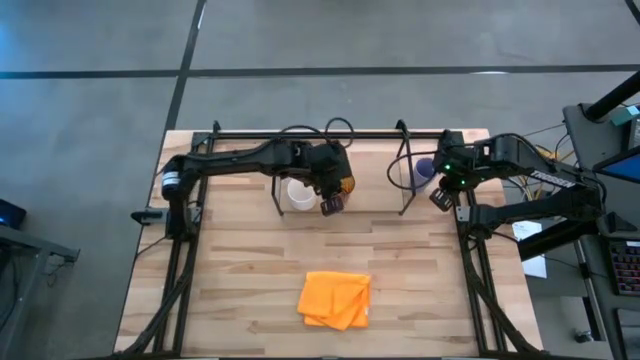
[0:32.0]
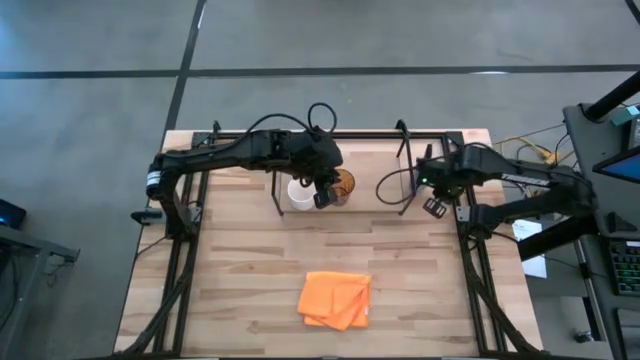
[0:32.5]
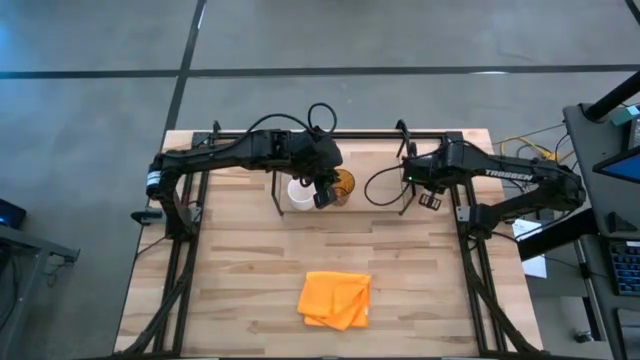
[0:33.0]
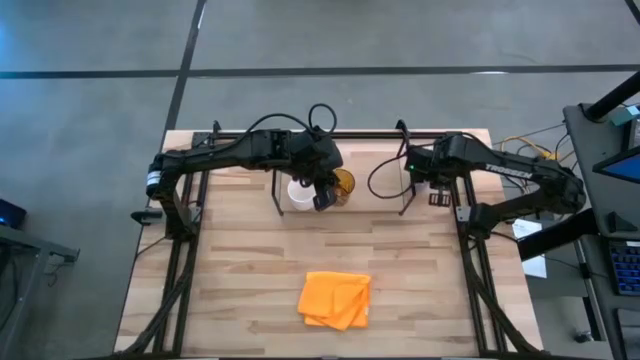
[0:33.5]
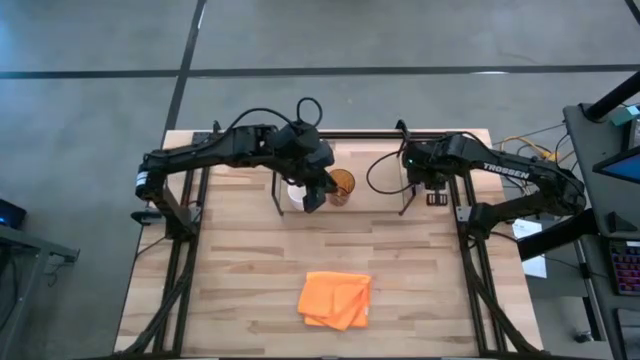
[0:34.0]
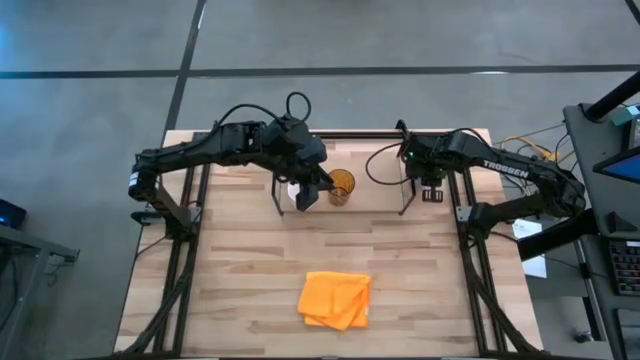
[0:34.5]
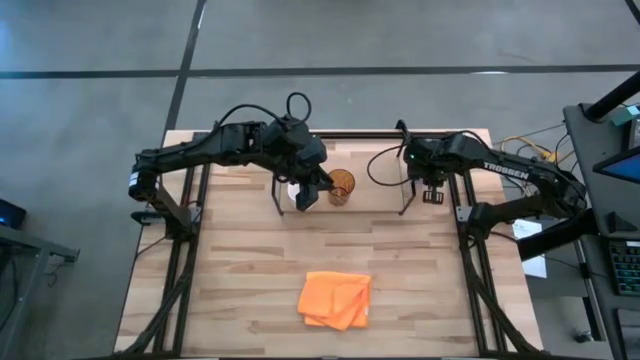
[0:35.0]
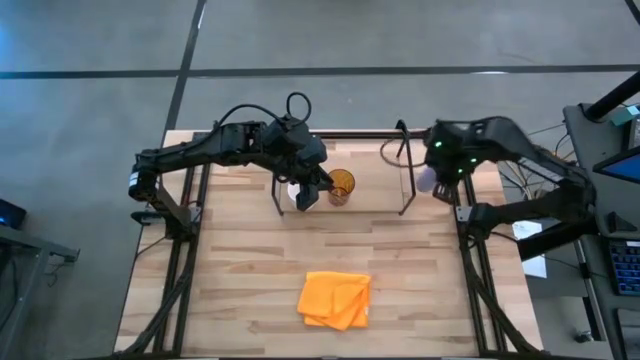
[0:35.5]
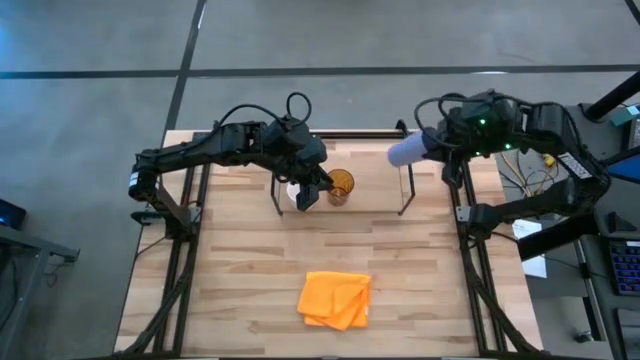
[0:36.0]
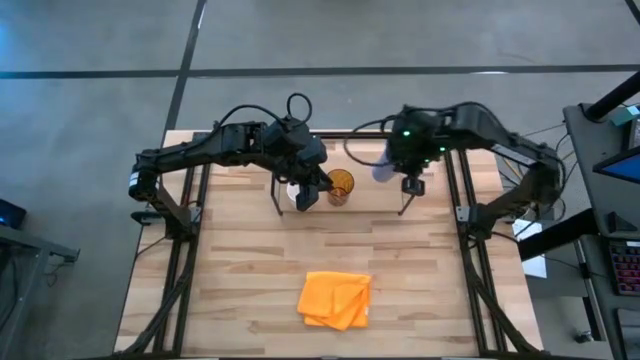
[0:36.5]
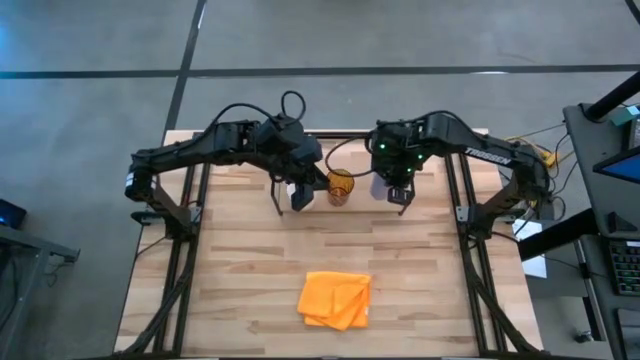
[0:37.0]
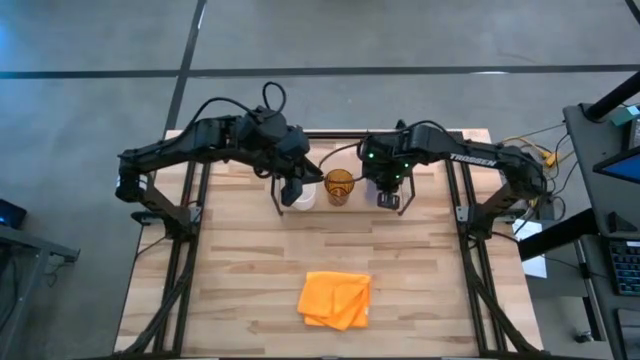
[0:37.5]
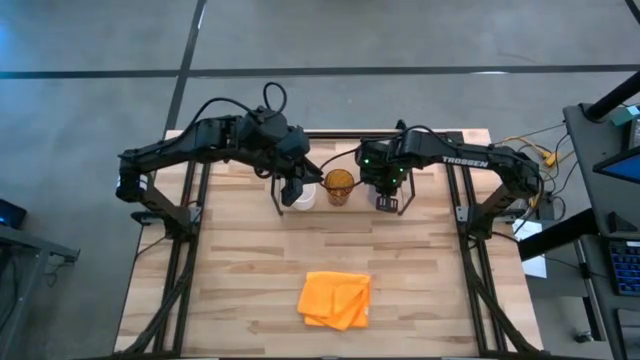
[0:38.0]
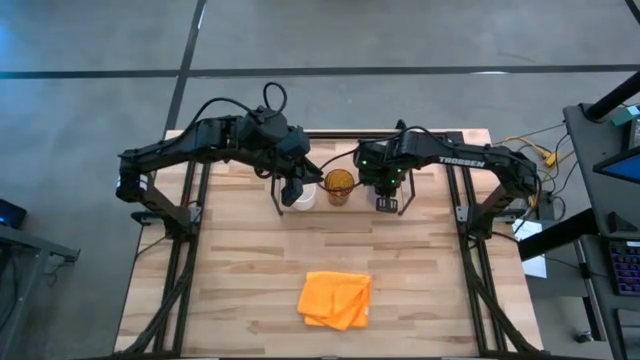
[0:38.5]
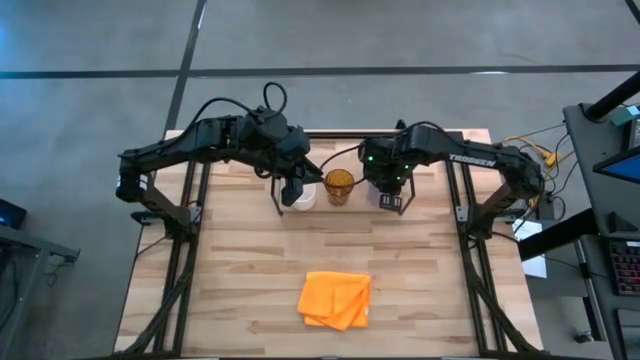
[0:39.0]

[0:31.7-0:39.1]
Task: Stack small to large cups/mugs on shelf
Put the blue cup on the shelf

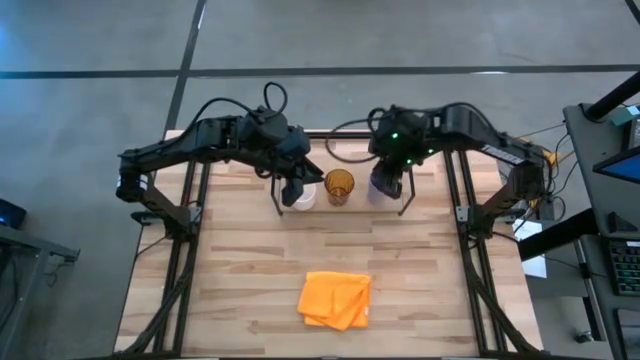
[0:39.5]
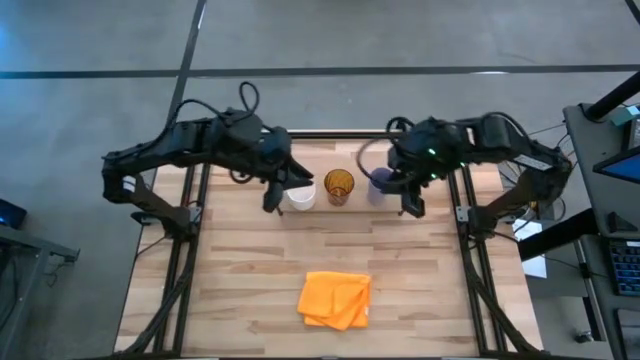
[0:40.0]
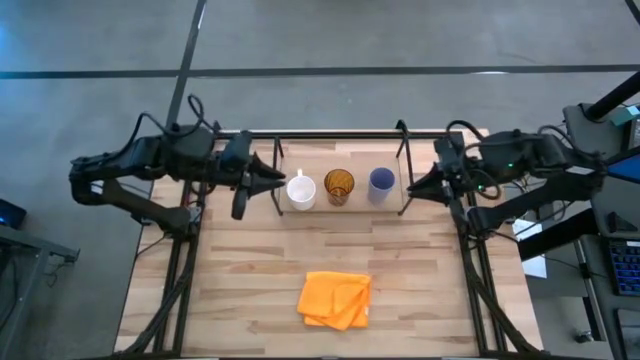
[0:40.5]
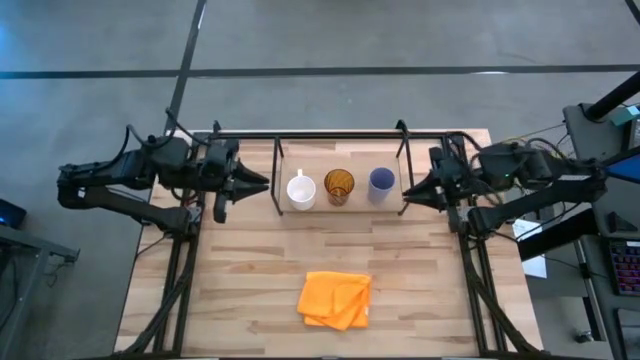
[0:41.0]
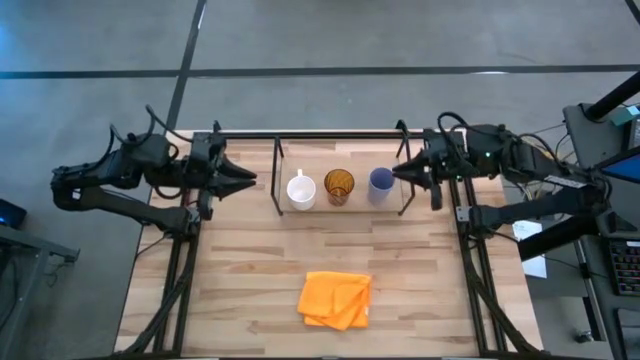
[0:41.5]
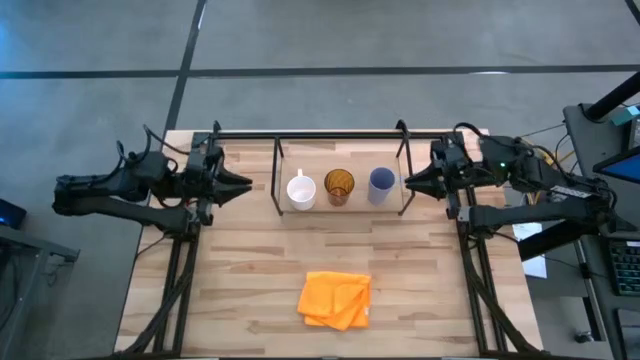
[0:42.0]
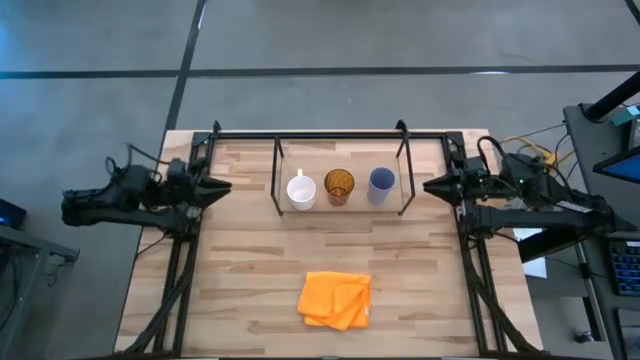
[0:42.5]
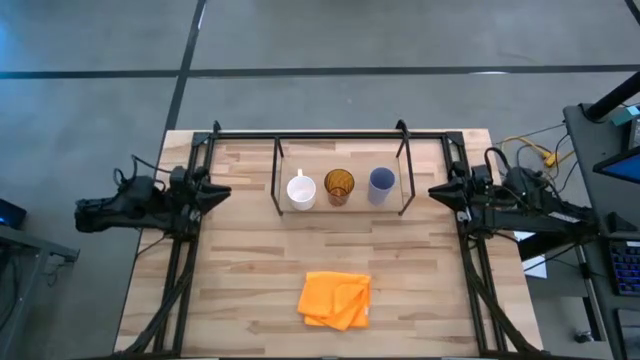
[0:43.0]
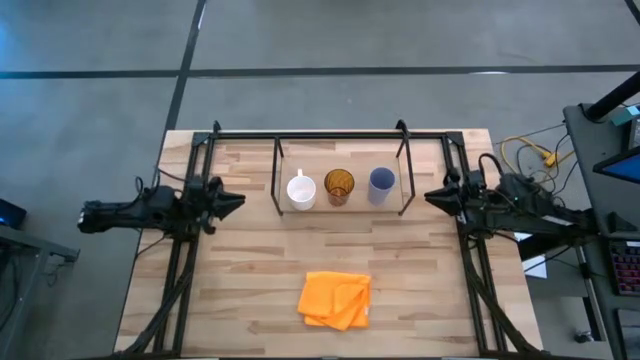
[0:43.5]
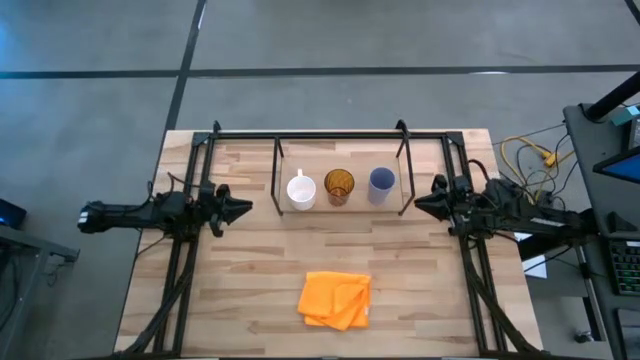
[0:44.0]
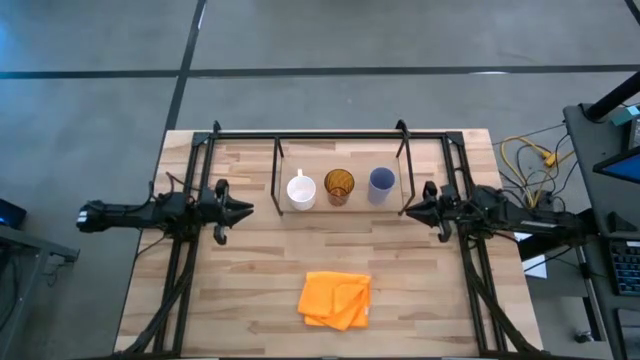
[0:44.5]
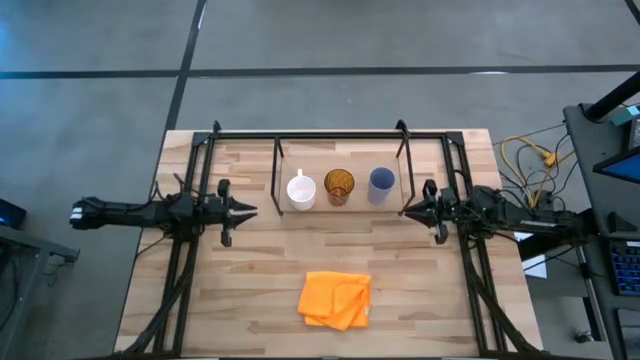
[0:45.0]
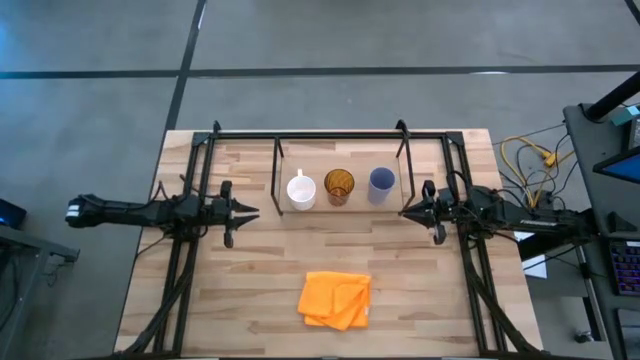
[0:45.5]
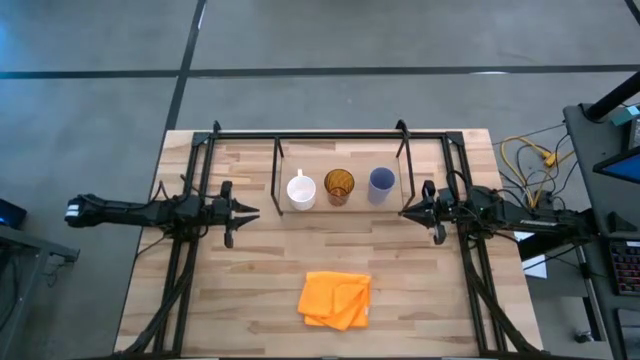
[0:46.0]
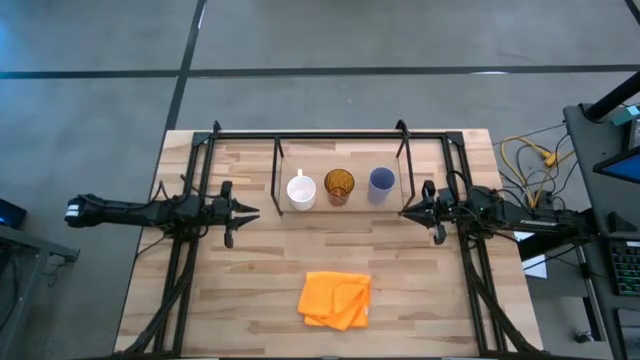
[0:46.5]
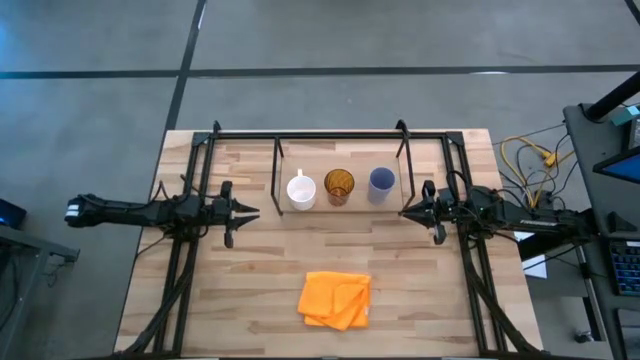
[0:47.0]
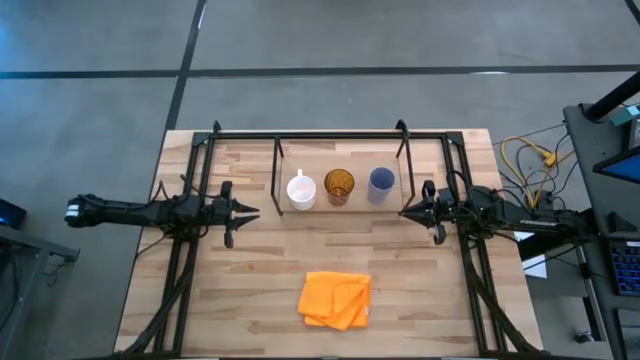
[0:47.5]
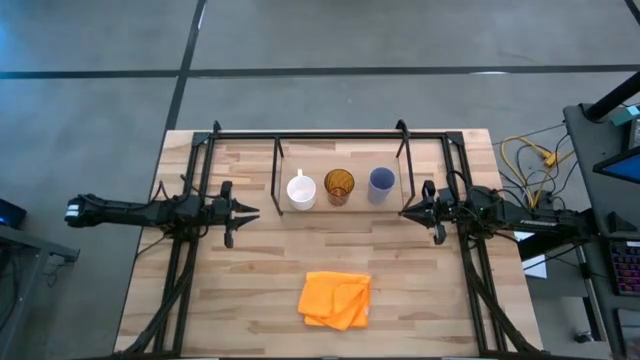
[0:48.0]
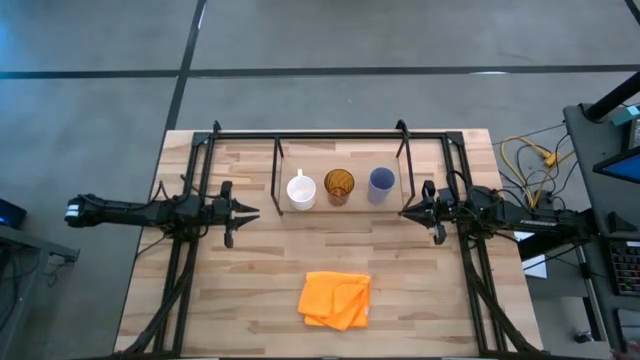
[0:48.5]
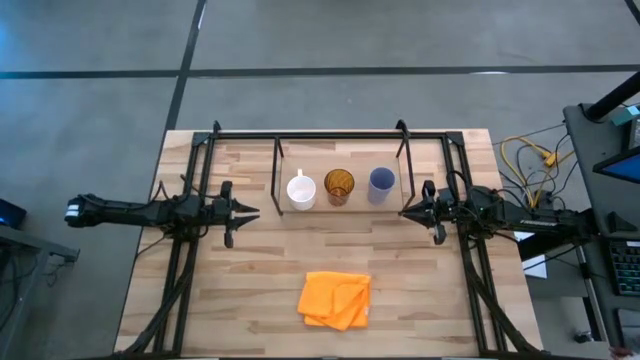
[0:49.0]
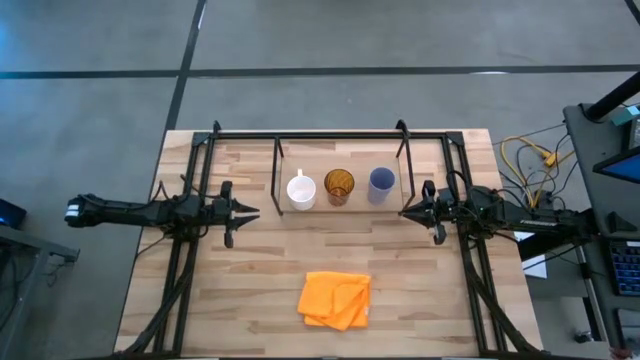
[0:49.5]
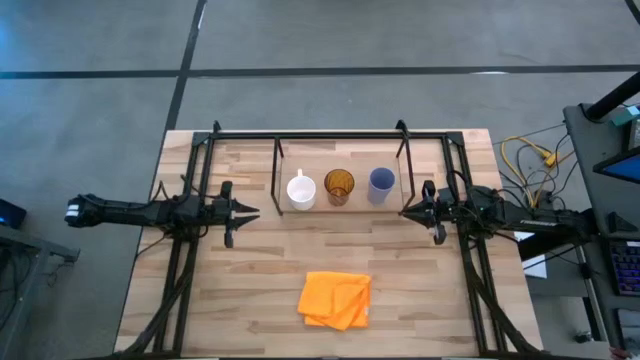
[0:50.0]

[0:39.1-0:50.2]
Return to Home Position

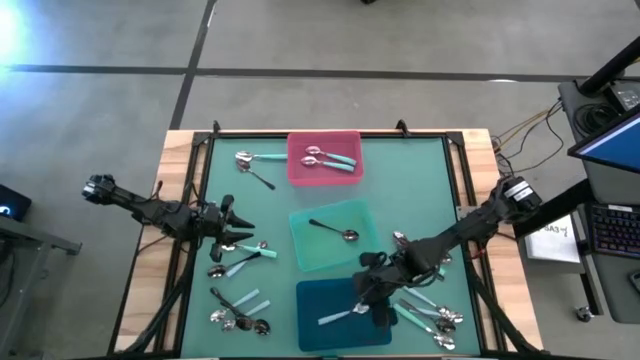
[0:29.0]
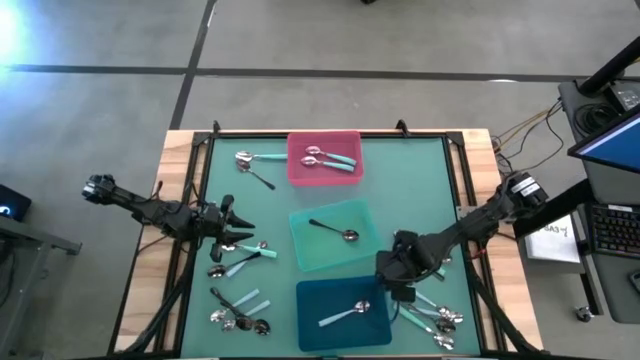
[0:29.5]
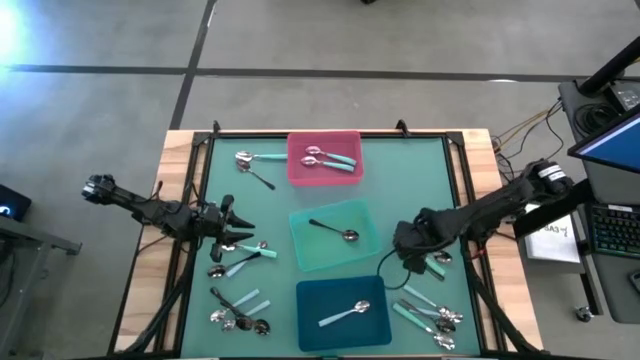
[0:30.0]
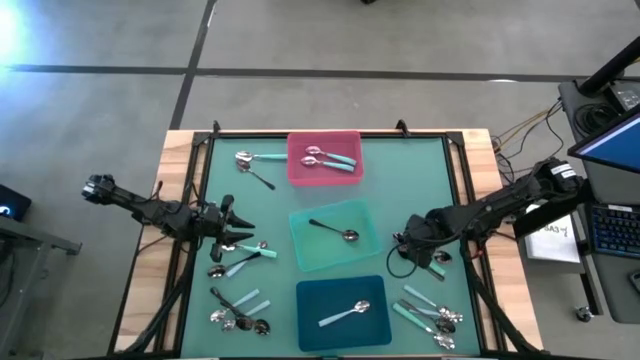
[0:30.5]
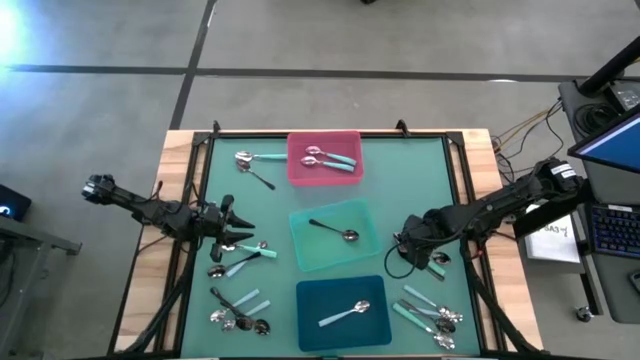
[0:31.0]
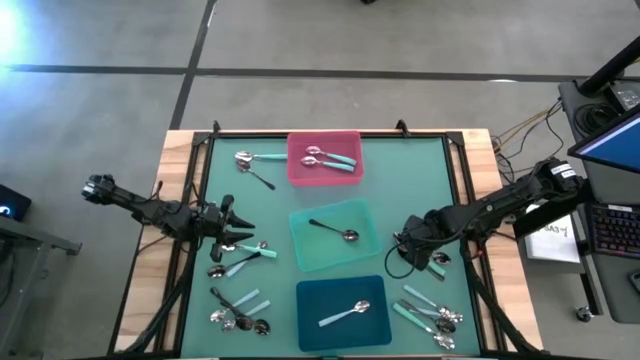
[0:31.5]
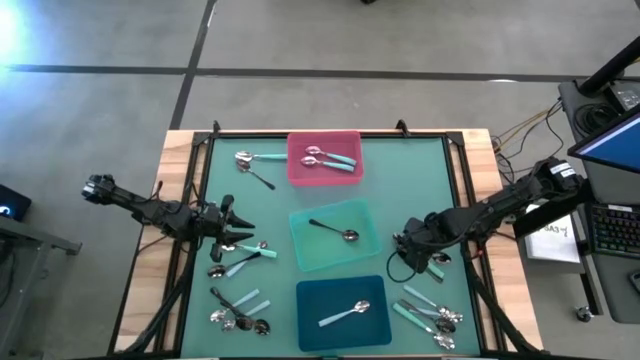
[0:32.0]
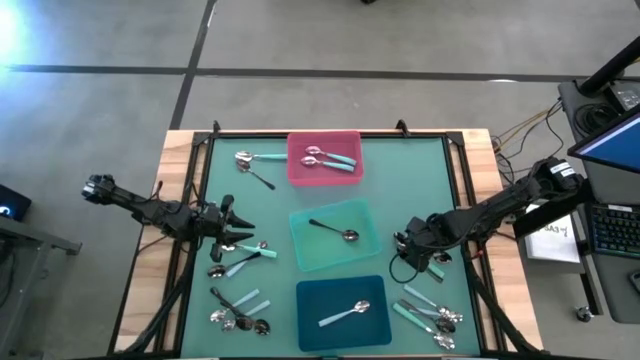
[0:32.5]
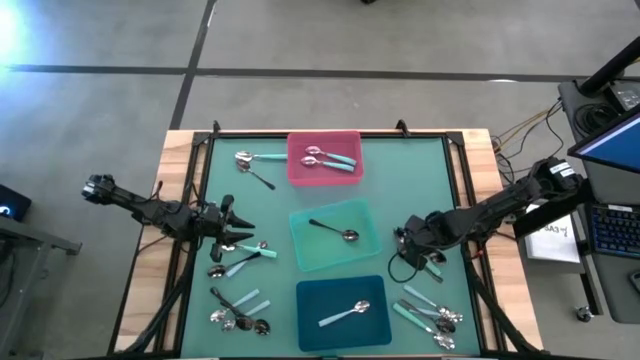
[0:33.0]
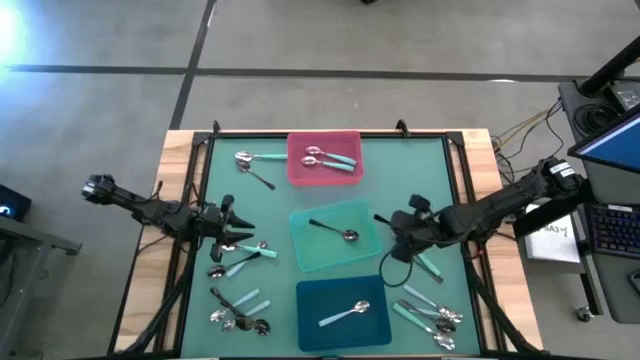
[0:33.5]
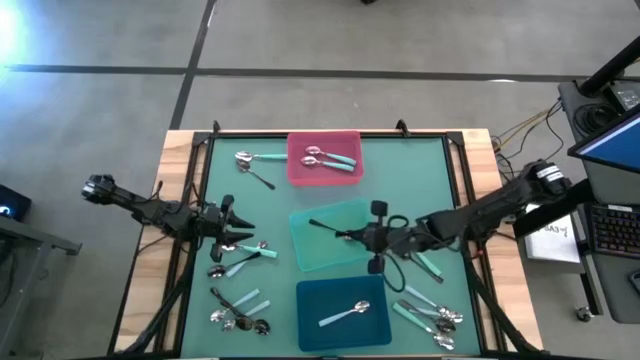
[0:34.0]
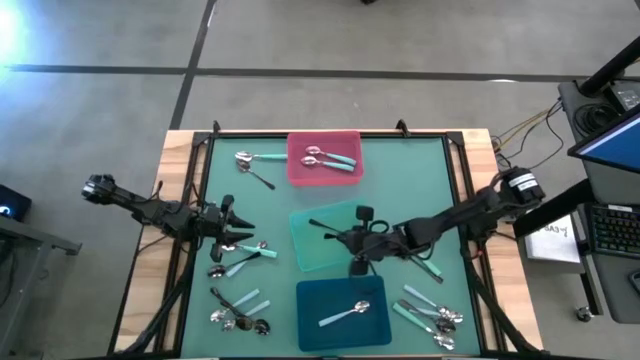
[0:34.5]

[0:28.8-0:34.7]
Task: Sort silverware by color (type)
Put the black spoon into the green bin
